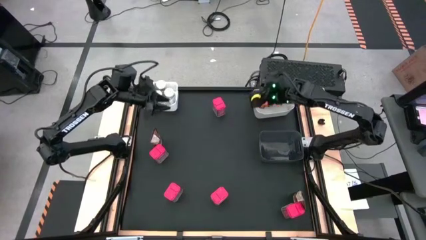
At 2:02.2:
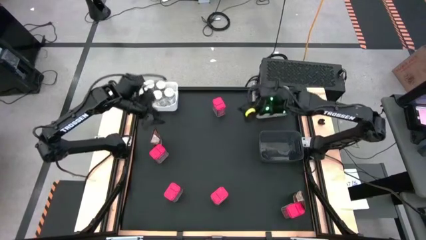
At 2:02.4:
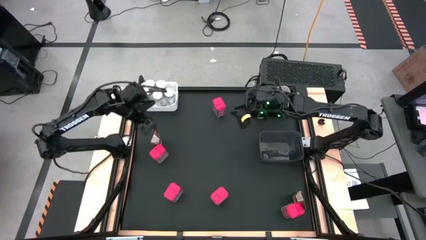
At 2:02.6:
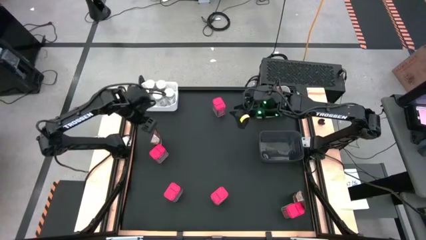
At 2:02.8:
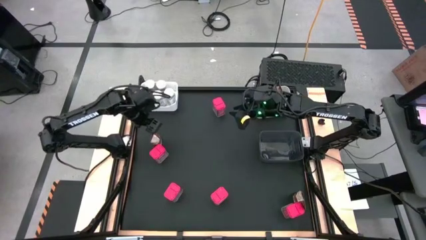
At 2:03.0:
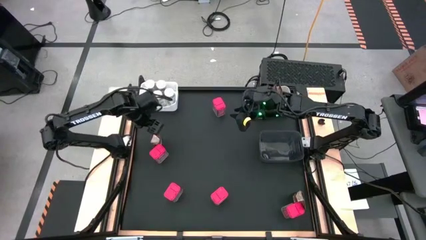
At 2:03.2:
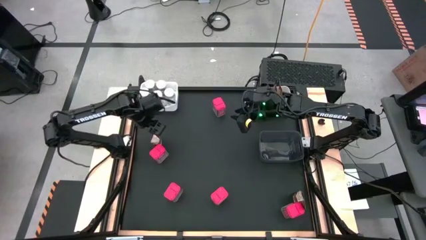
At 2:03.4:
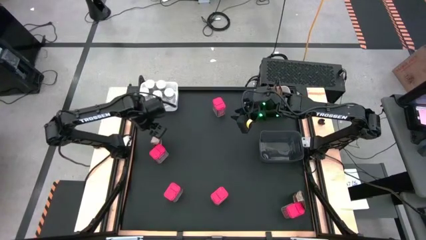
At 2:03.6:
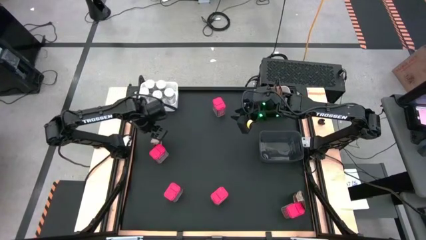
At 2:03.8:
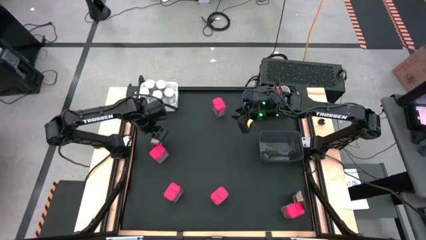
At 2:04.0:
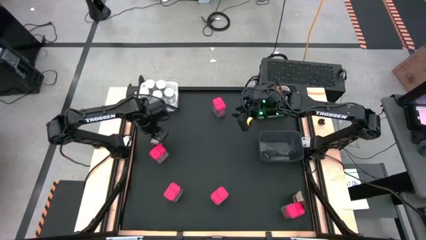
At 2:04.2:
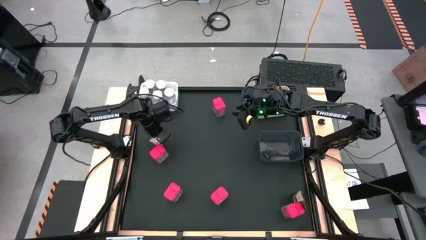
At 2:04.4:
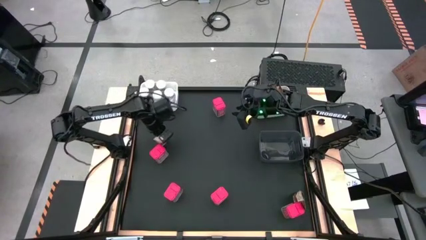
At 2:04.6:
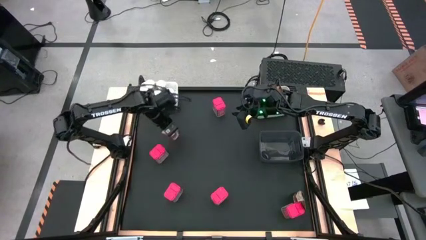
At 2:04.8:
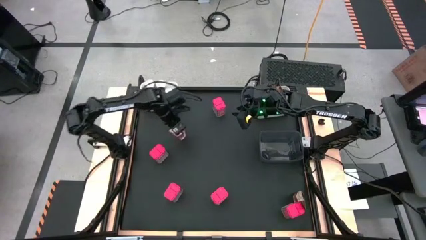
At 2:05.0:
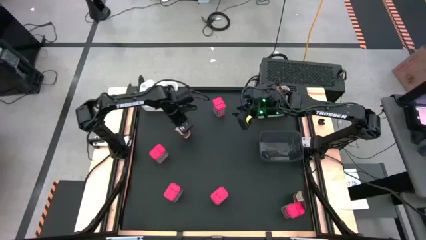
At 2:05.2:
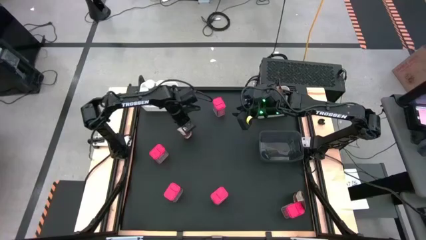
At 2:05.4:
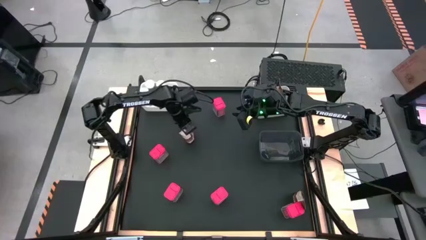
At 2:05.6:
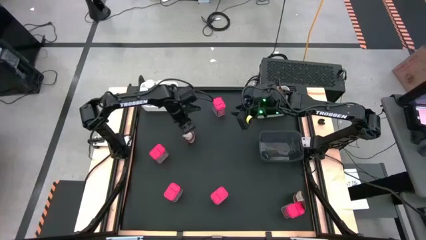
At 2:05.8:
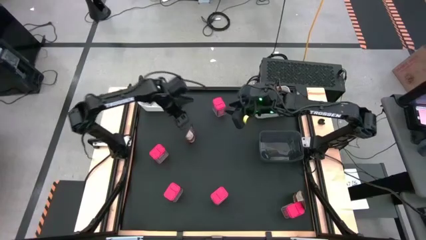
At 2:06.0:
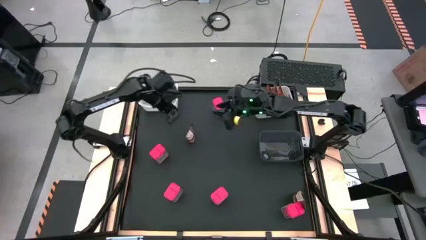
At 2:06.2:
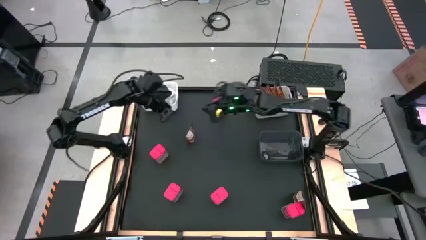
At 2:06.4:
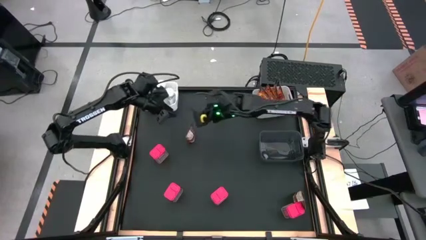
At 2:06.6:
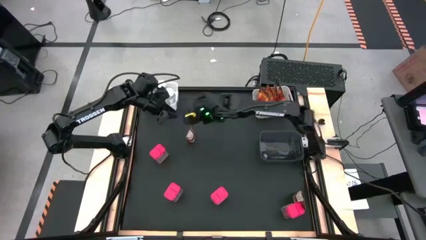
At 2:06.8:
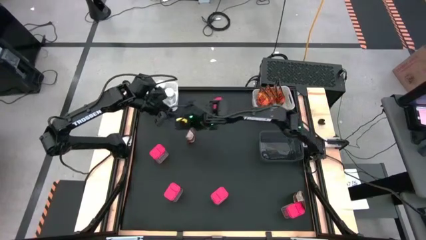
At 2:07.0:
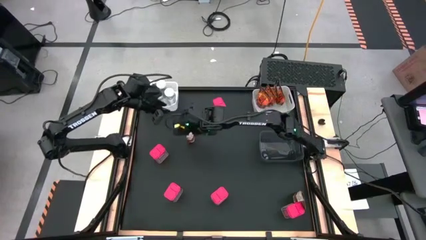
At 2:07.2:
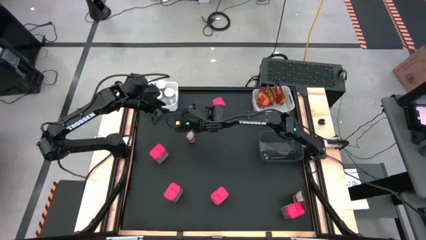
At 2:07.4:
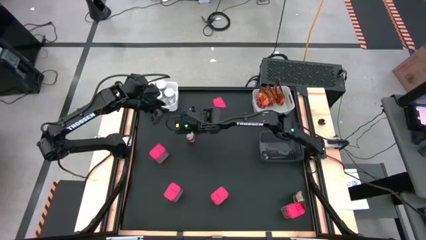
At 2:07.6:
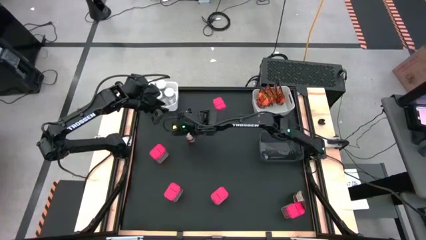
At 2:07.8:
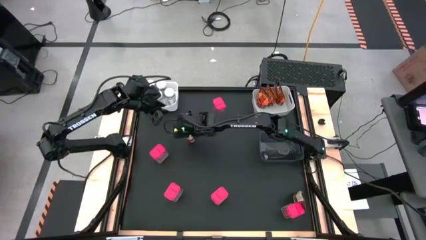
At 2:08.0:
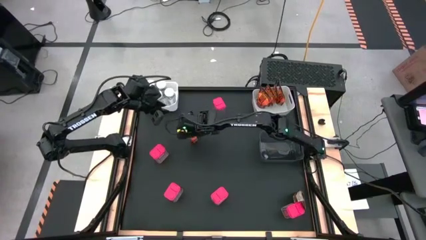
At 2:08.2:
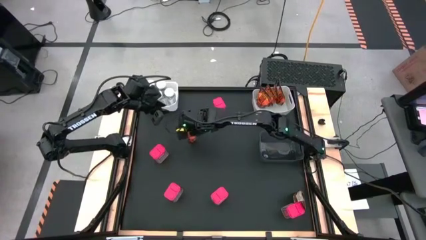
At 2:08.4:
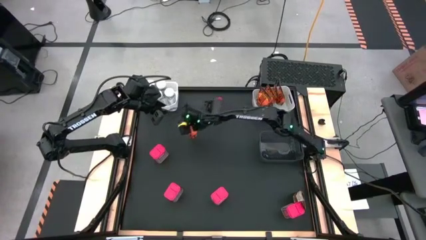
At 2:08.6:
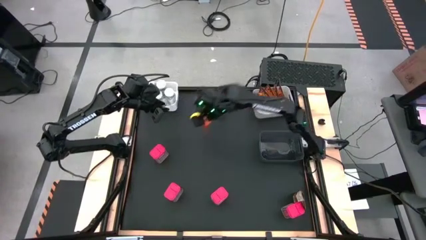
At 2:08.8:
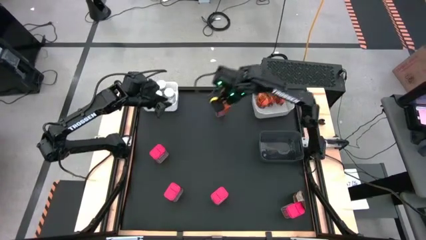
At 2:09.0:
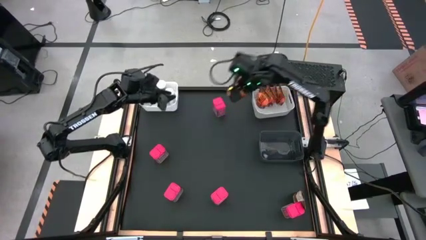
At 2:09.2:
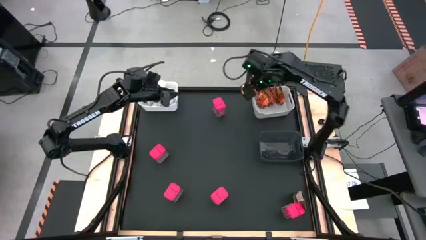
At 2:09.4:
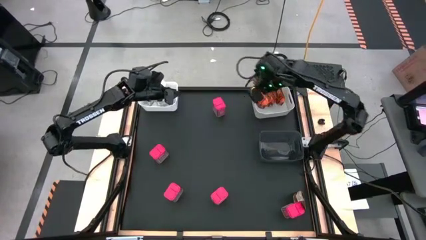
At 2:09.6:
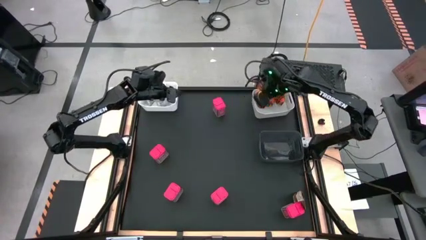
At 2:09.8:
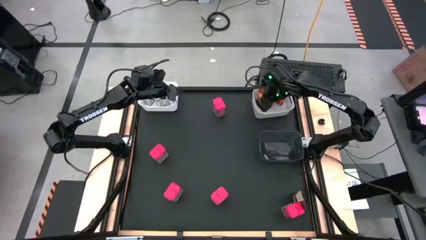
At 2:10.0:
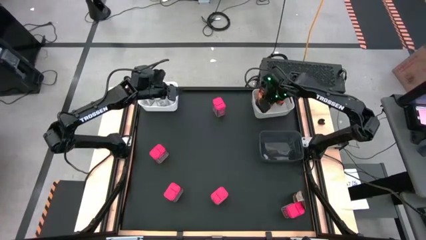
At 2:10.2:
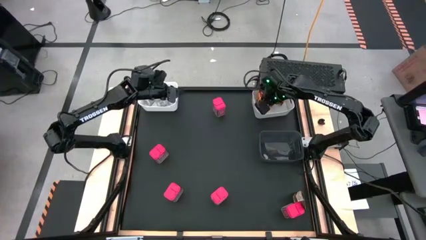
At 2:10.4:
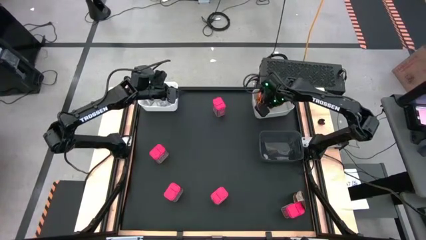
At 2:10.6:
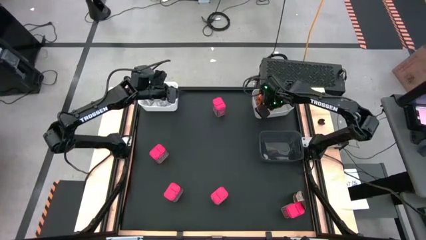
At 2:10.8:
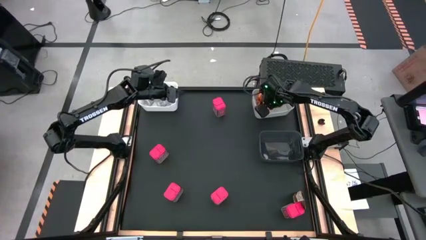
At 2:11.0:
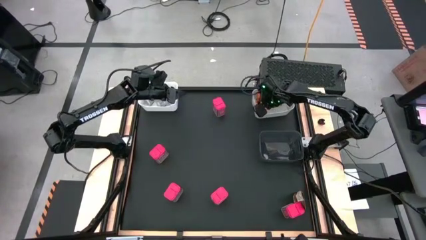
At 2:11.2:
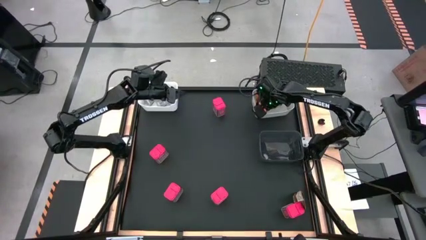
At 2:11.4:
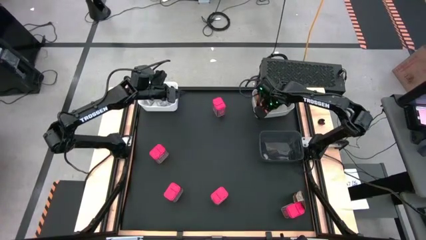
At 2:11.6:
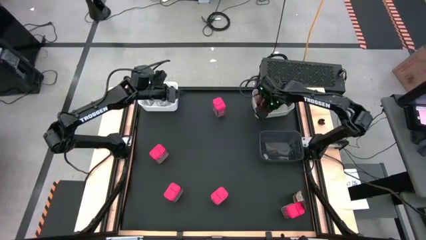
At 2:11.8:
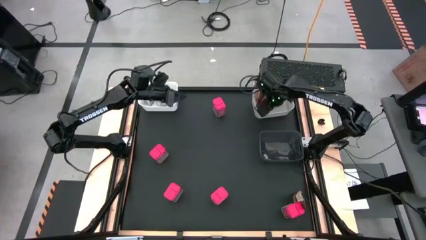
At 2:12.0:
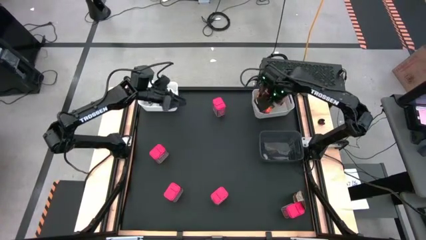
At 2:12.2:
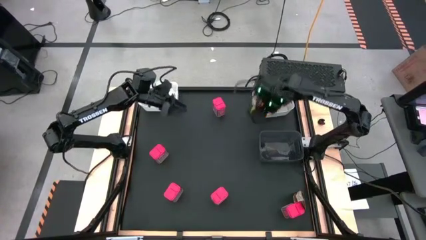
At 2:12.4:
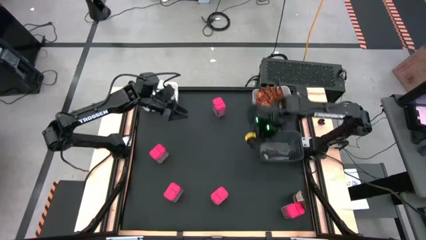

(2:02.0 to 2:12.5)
Task: Sort spices by type
Put the orange seasoning bag into the right white bin

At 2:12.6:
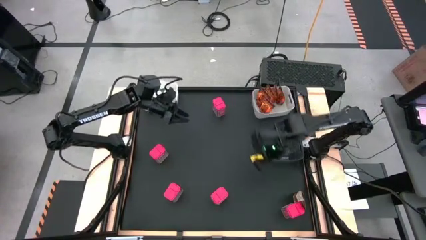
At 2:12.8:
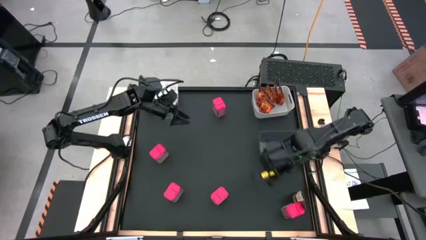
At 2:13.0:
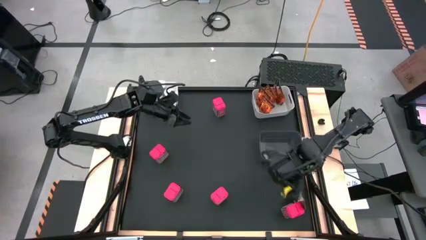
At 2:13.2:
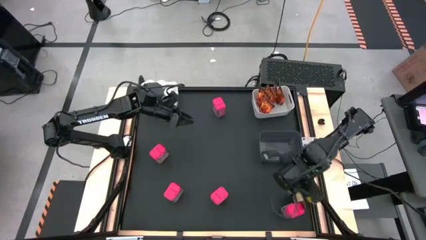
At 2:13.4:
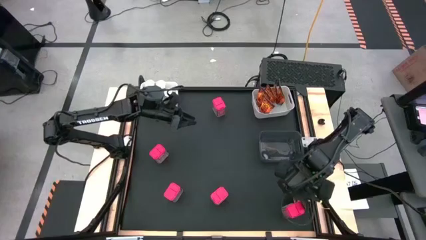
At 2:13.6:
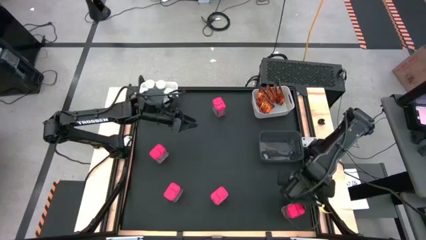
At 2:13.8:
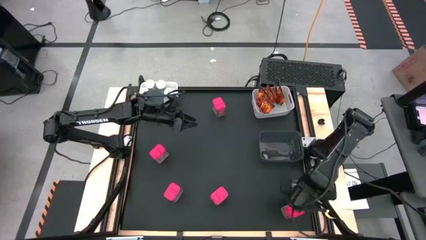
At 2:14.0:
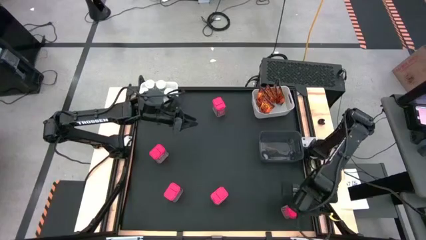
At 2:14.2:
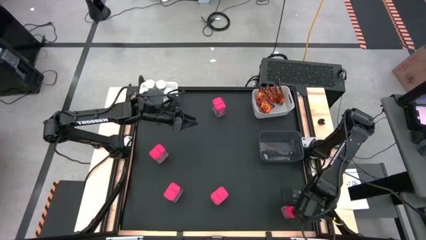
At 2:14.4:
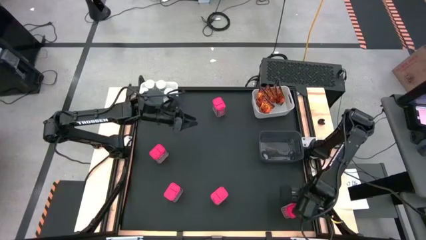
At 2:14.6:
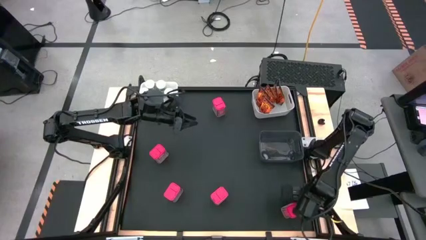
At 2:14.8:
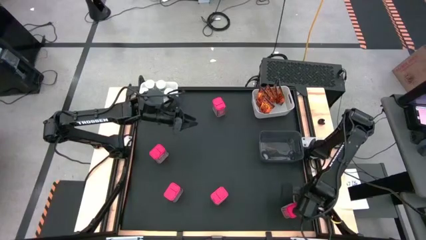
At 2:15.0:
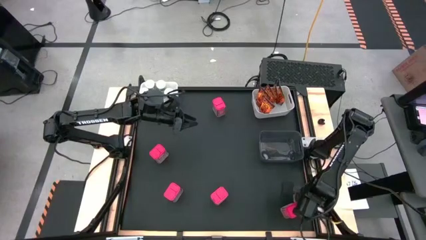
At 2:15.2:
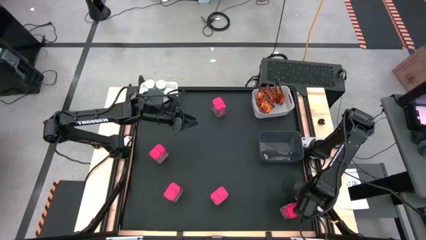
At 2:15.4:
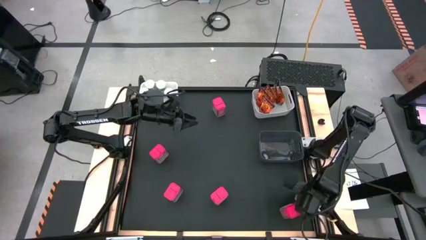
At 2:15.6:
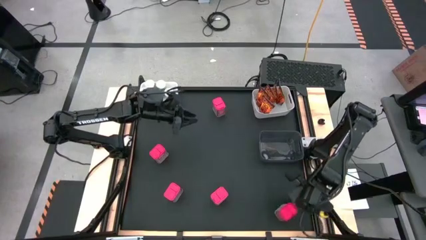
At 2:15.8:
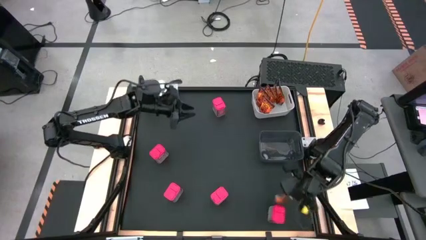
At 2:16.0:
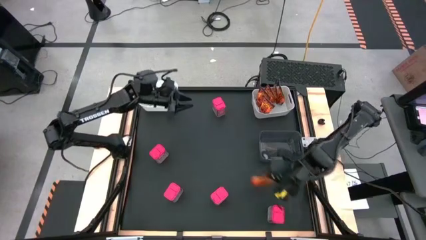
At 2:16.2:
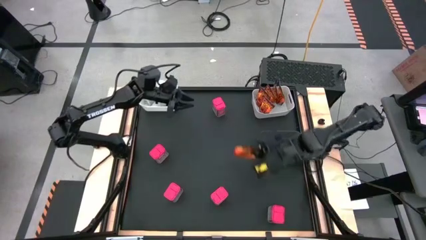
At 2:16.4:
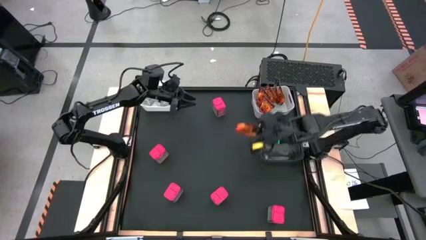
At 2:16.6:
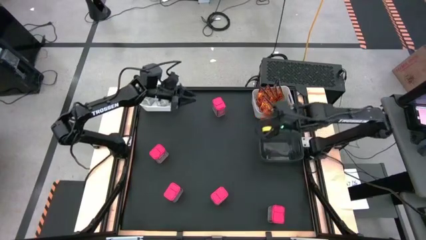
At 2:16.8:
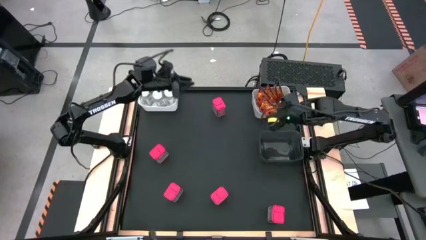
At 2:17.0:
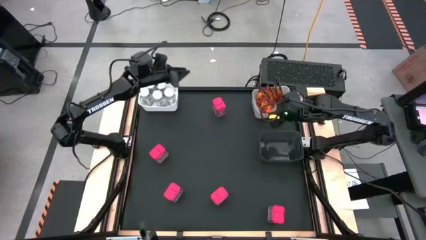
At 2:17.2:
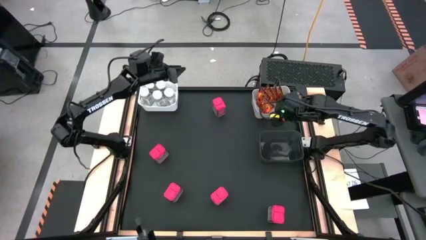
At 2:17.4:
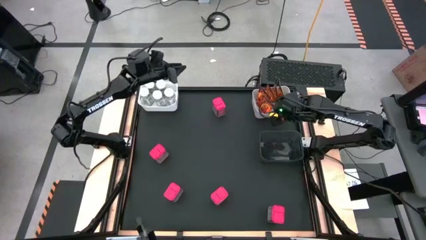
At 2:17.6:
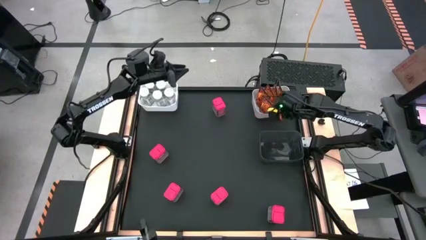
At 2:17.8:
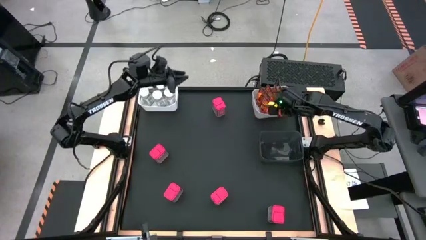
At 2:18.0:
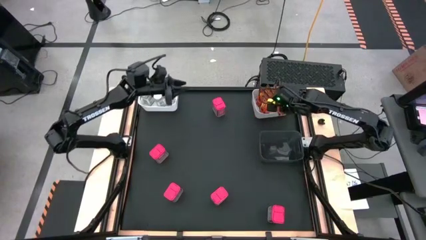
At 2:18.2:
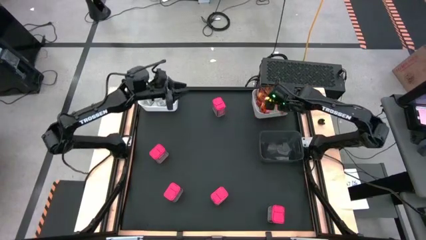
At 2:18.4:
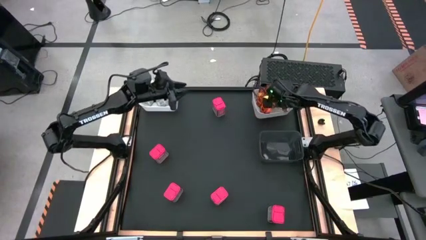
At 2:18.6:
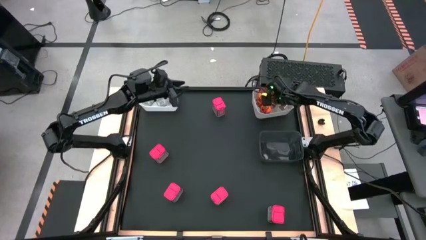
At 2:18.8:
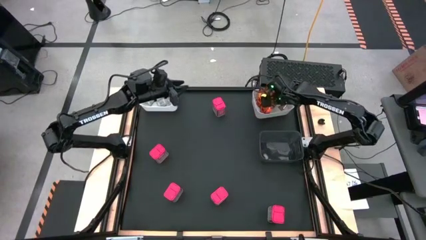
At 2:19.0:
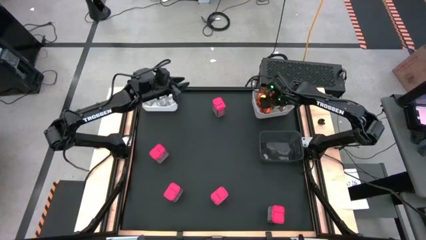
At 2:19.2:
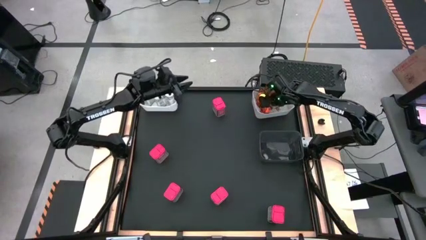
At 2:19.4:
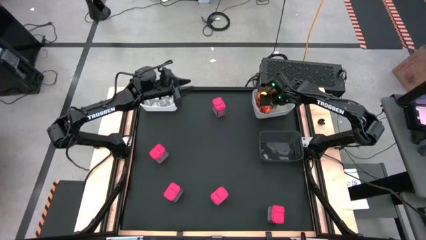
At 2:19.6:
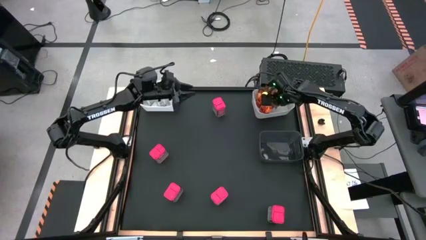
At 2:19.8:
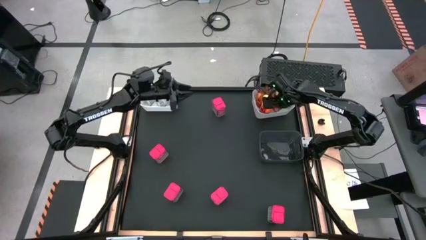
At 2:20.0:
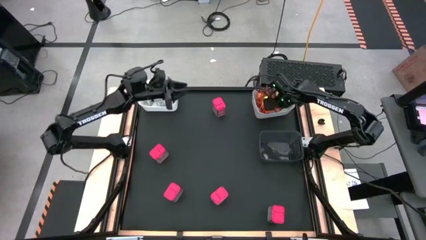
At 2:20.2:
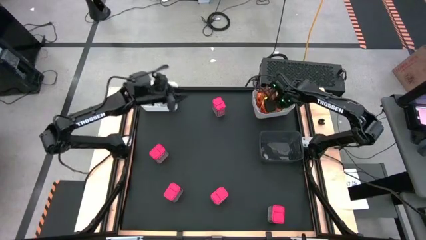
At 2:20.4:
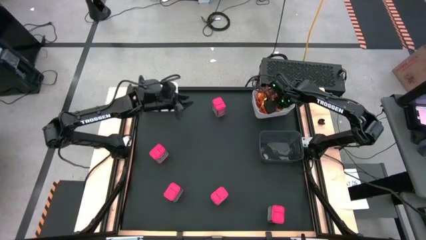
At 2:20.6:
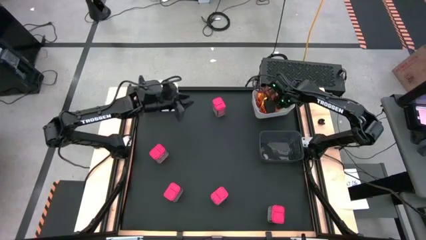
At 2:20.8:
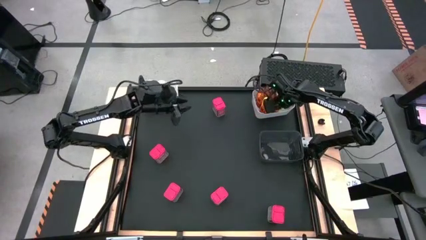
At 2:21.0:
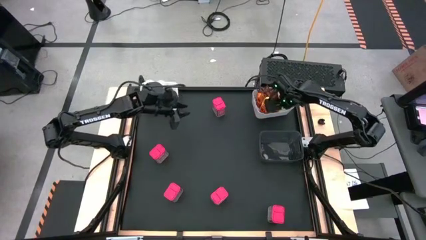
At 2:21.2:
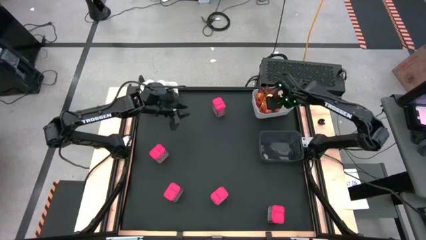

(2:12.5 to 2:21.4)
Put the orange seasoning bag into the right white bin
